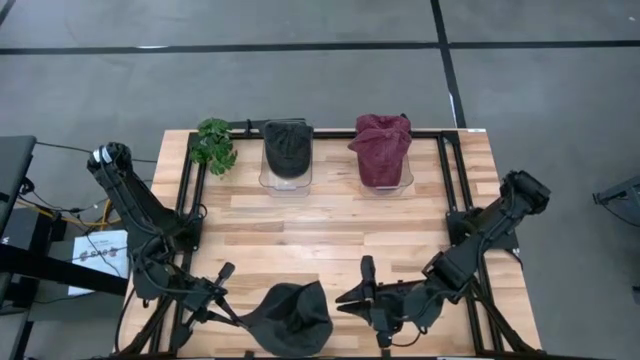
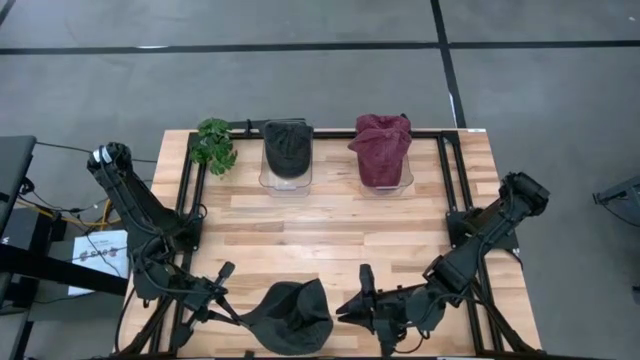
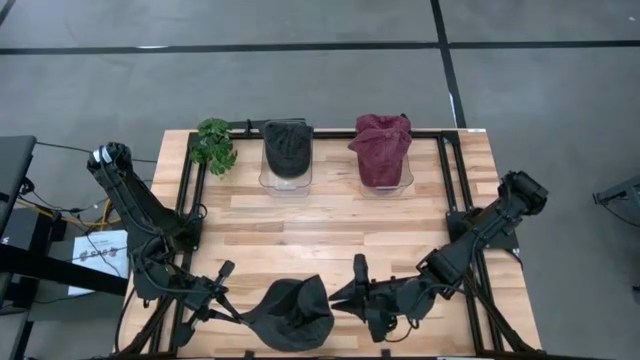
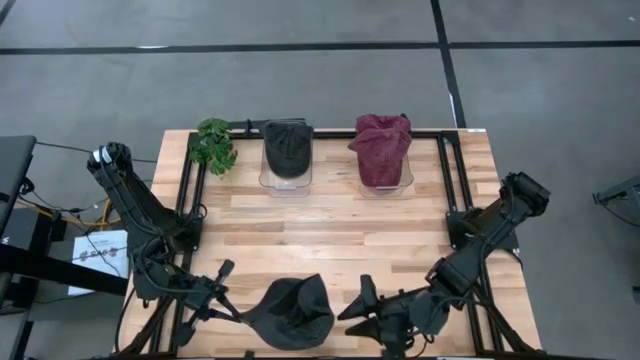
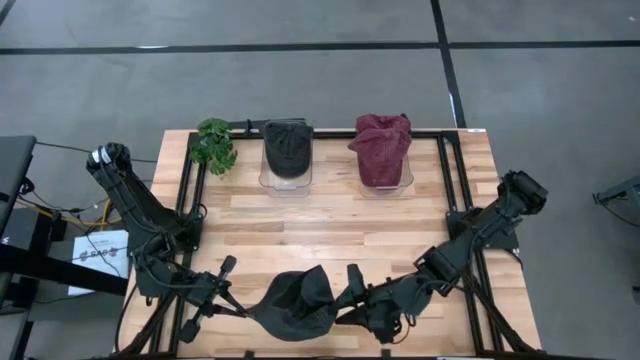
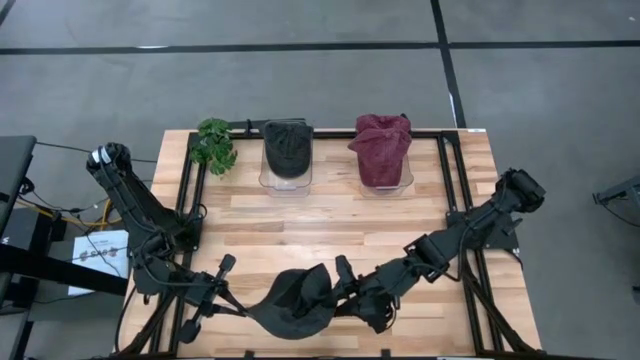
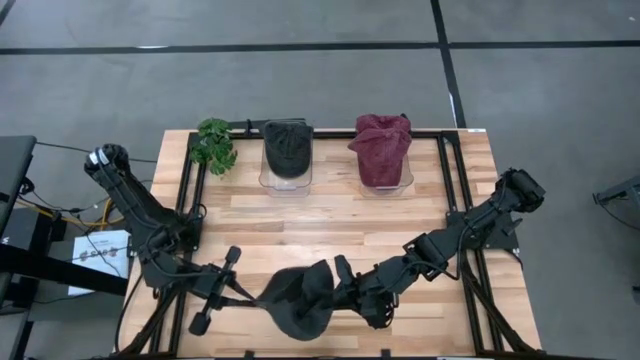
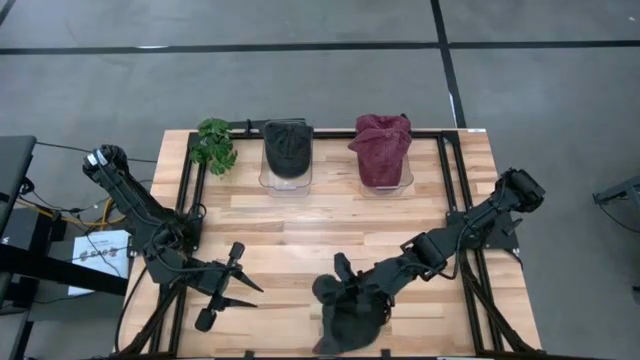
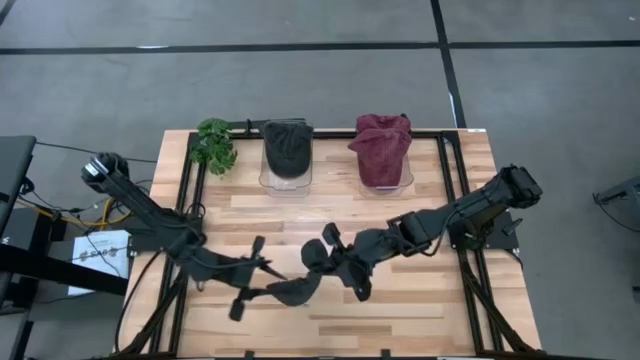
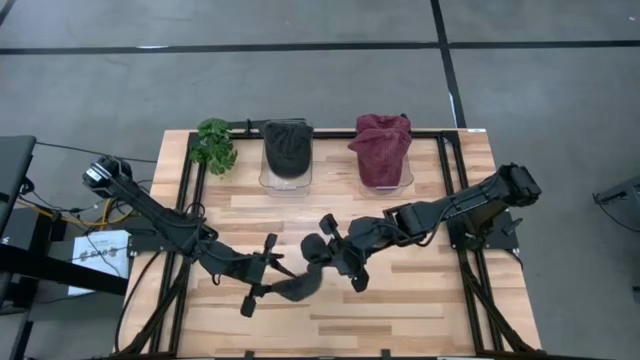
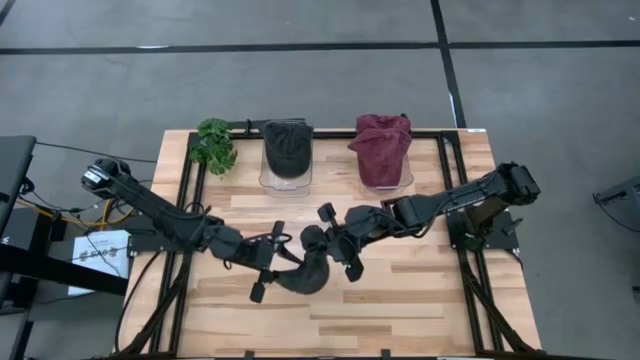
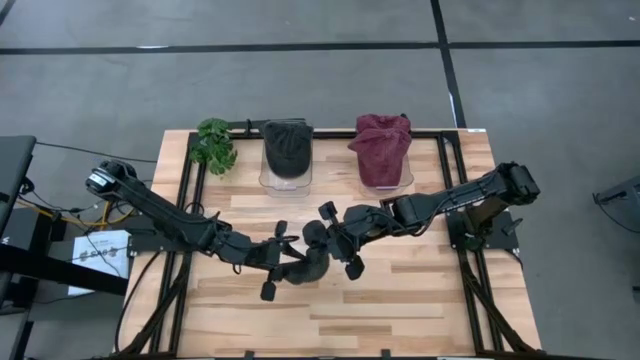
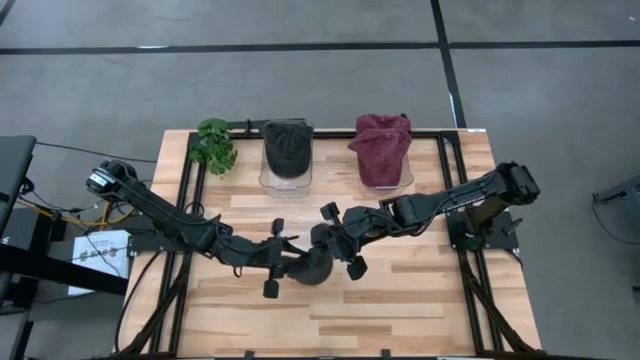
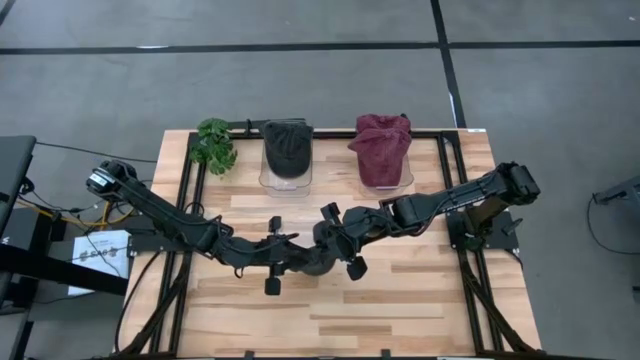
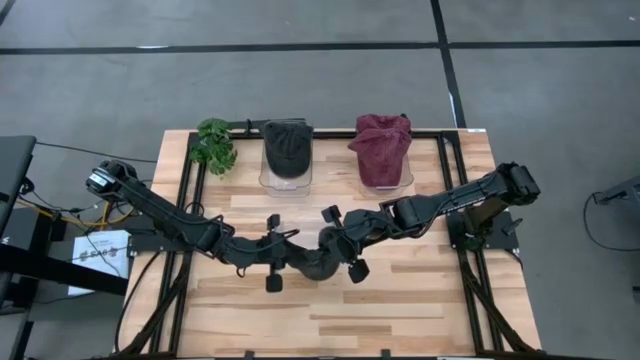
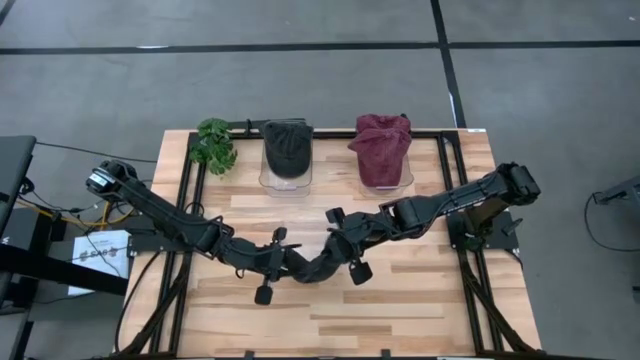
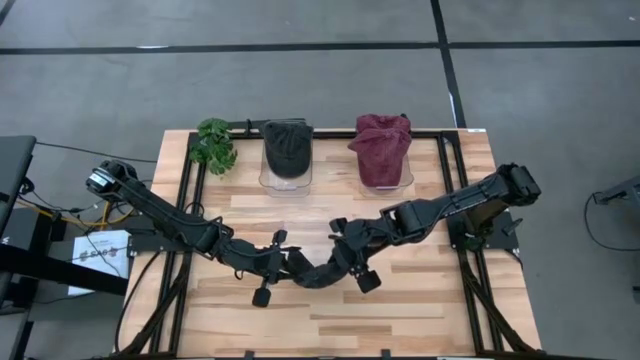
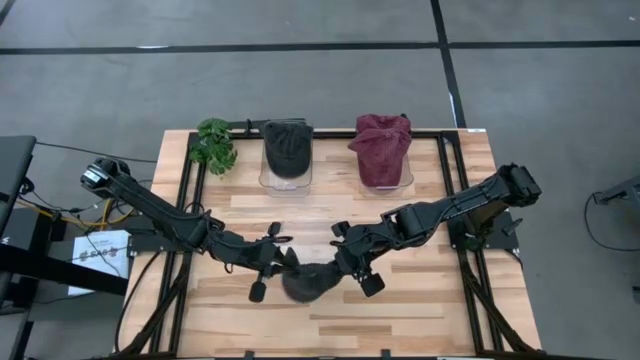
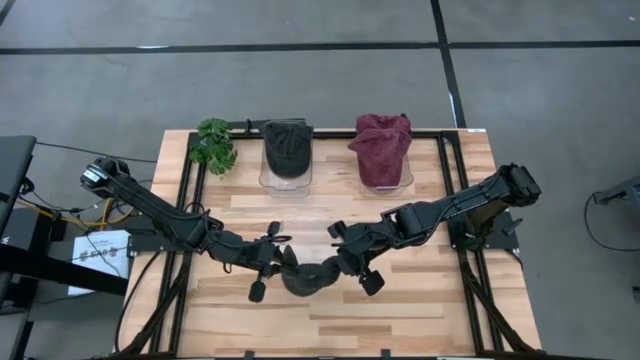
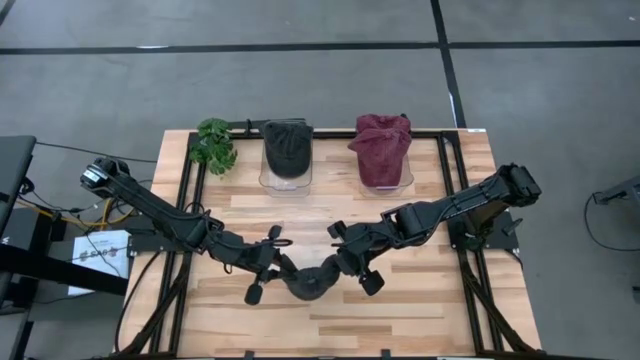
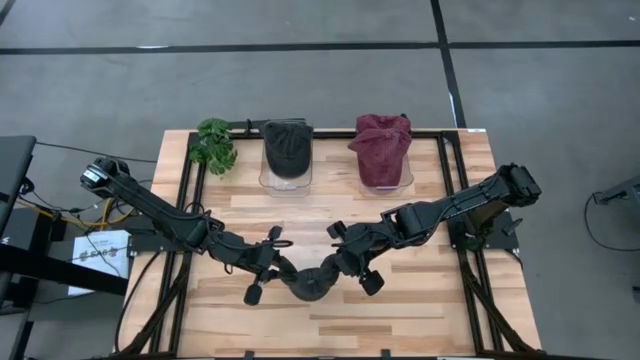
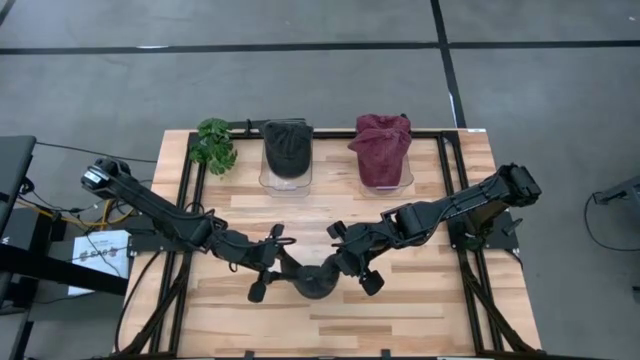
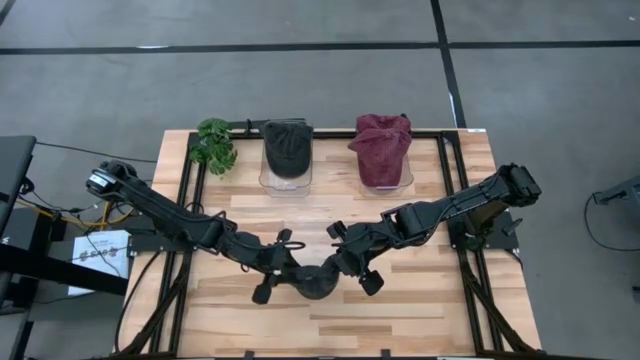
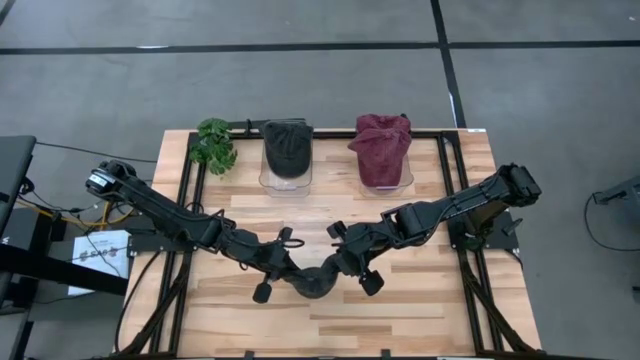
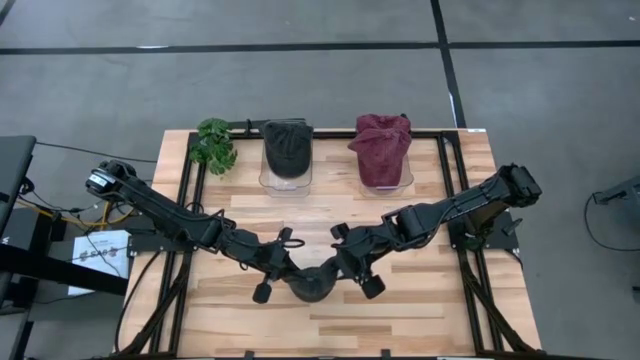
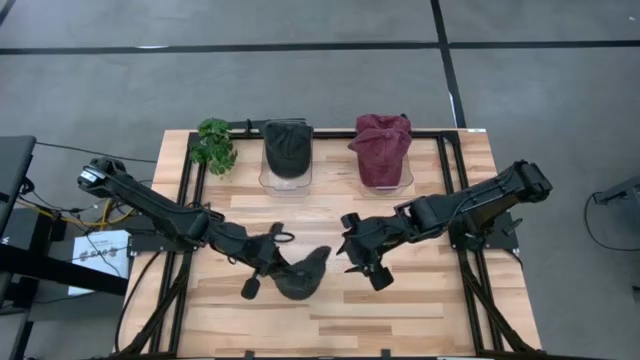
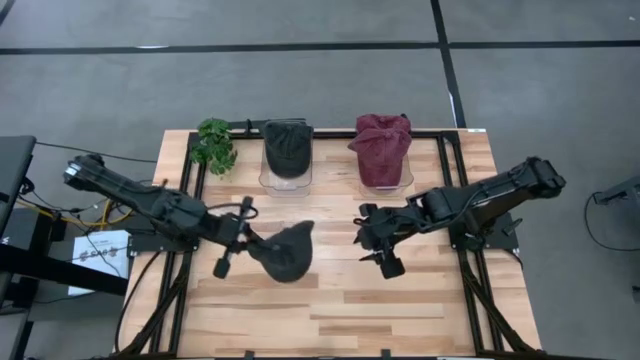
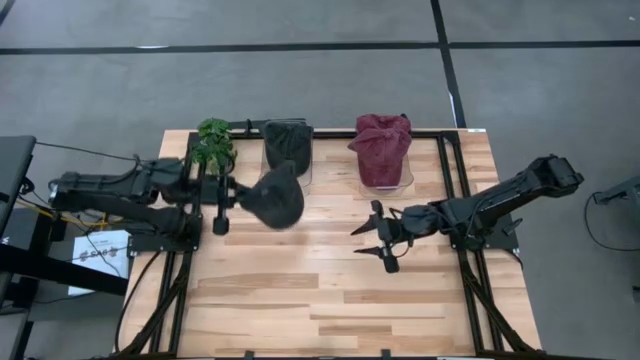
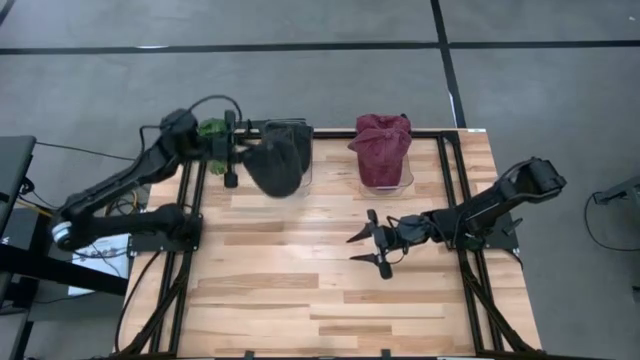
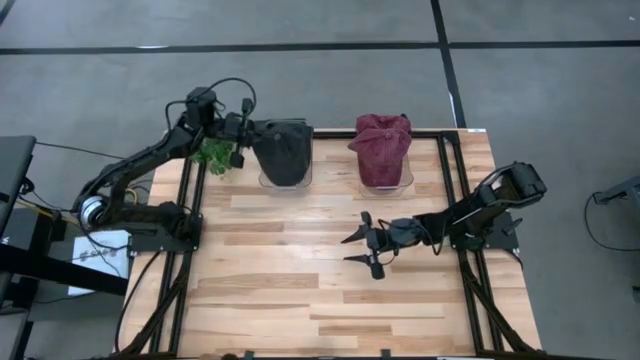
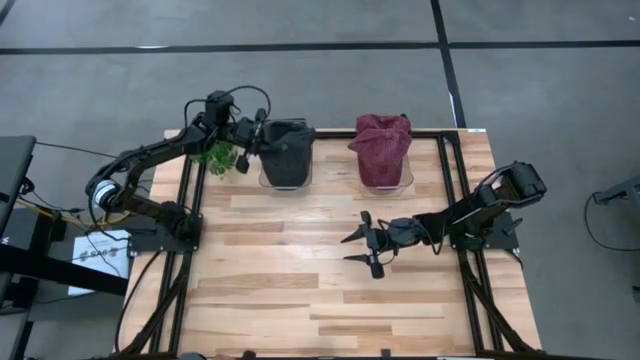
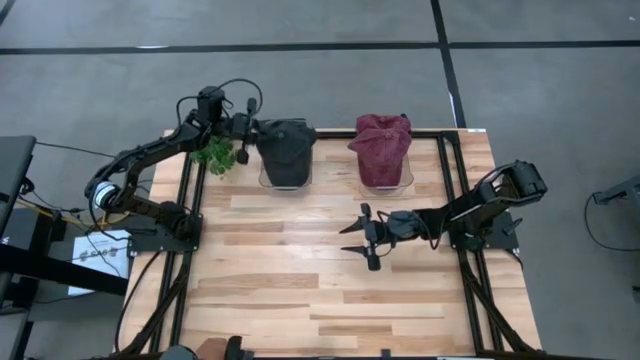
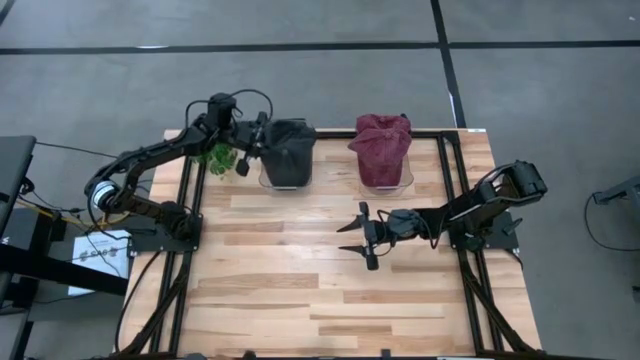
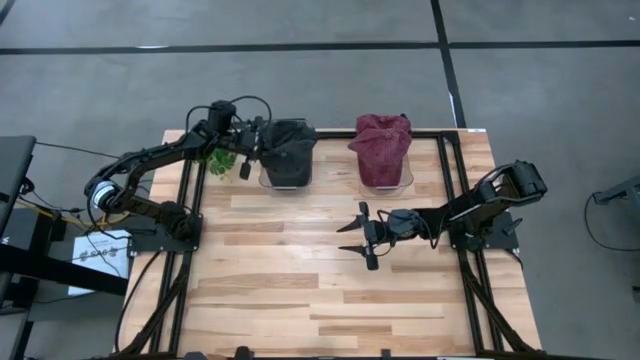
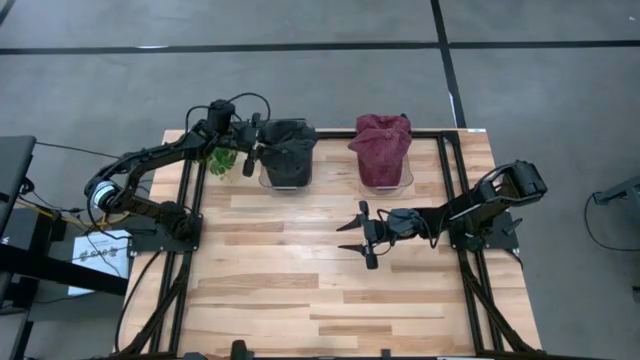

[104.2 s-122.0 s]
Task: Pick & Place hat
Put the black cap into the left transparent bin

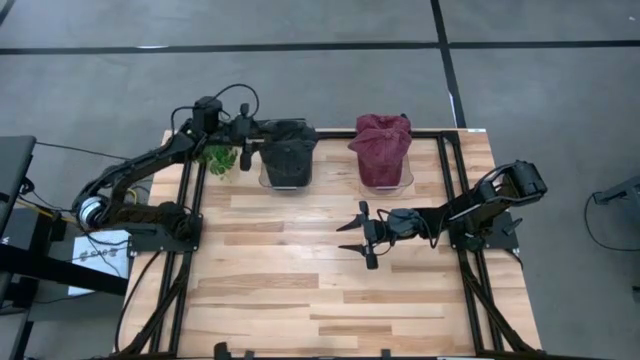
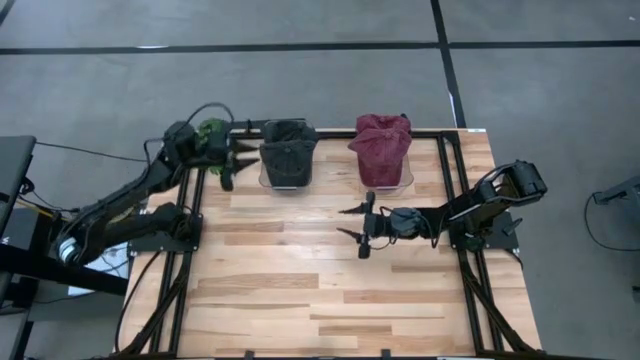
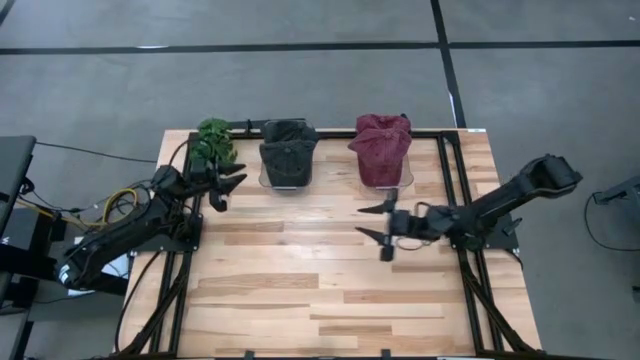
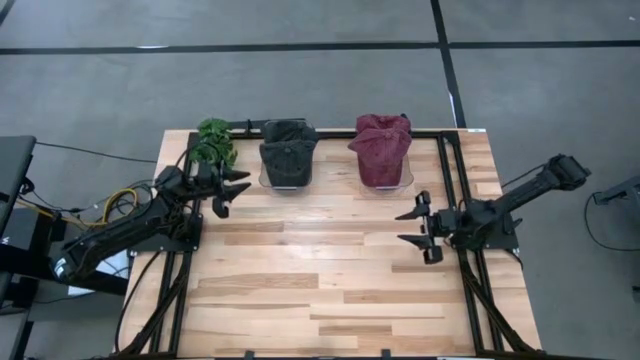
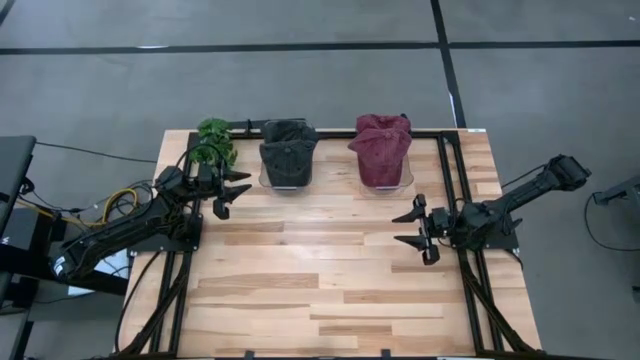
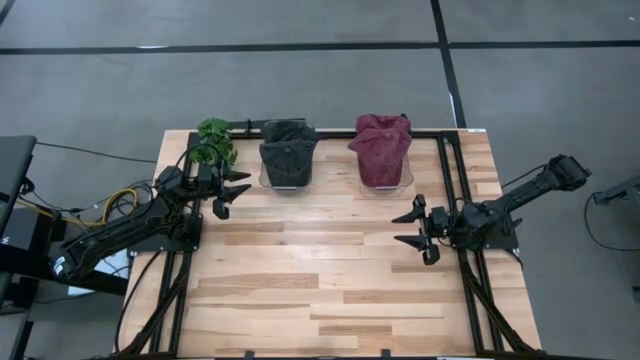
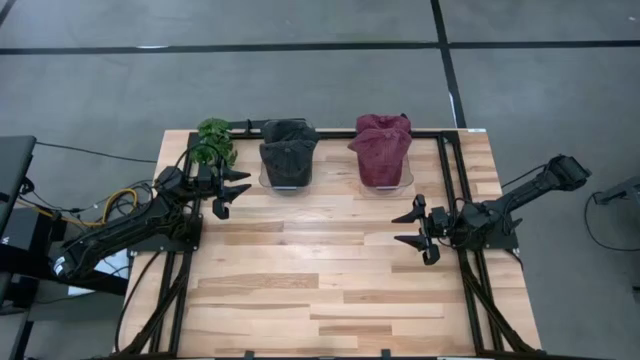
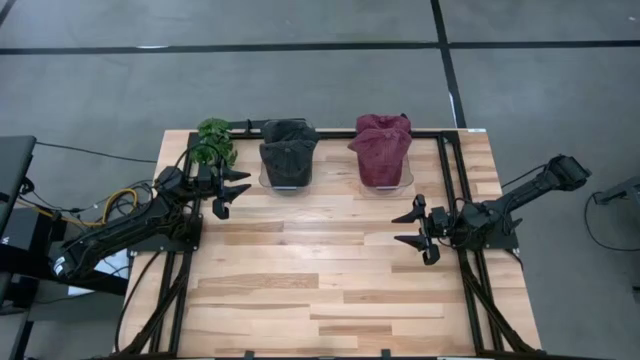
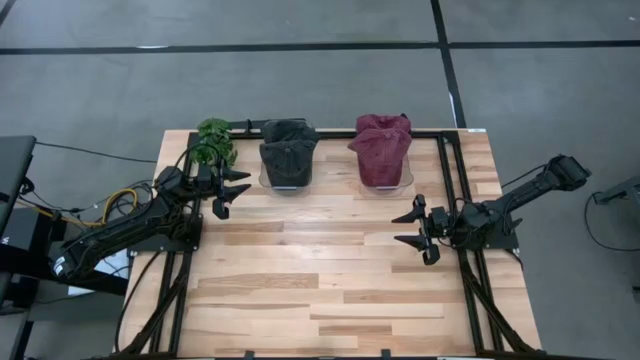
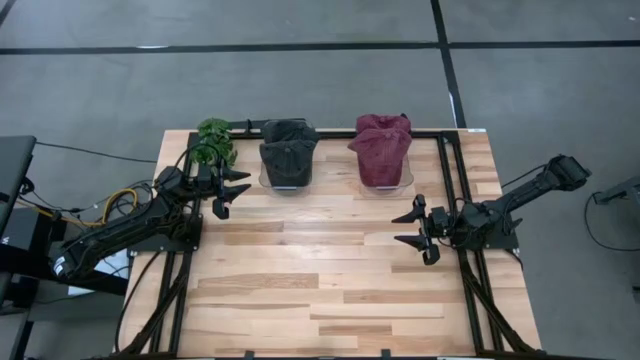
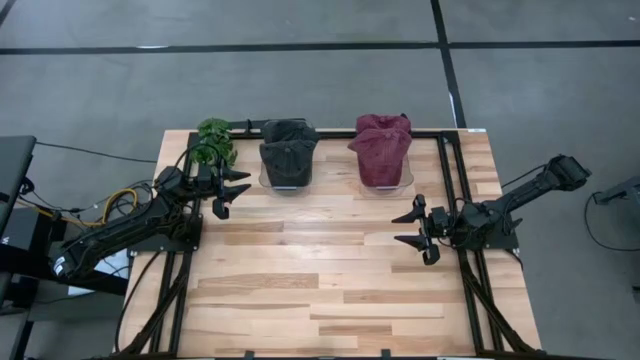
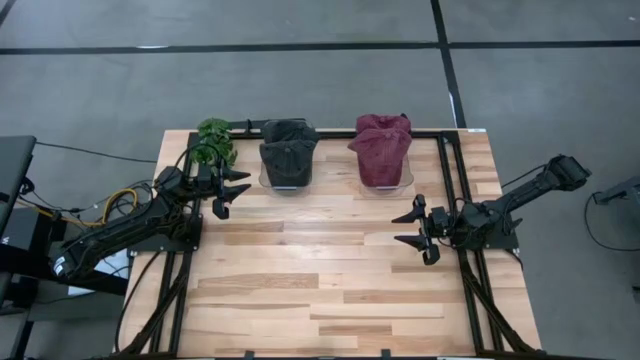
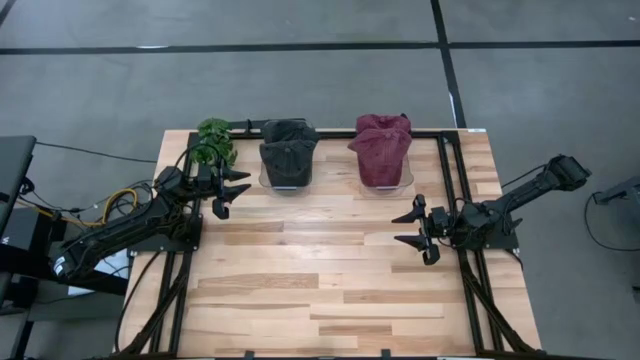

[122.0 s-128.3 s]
Return to Home Position
